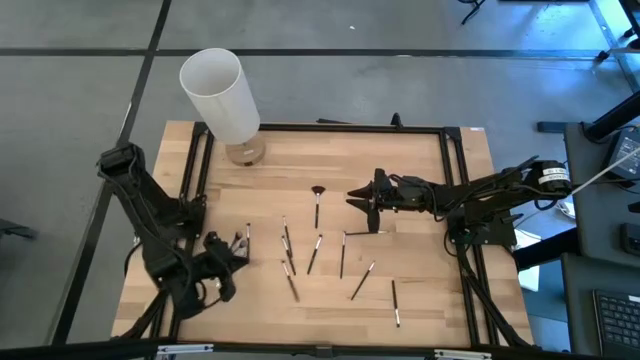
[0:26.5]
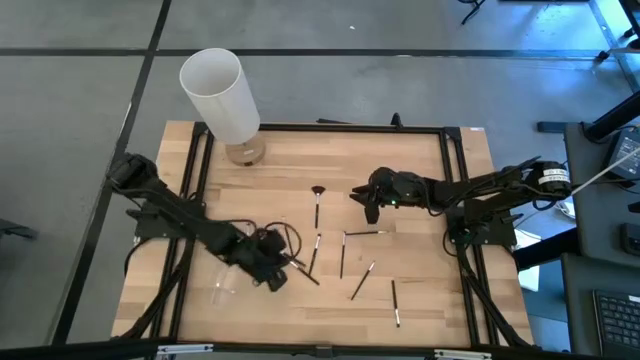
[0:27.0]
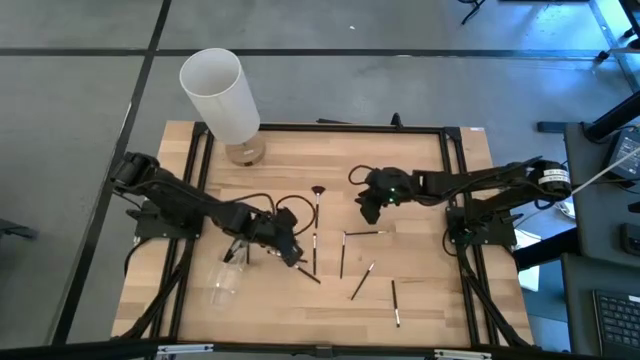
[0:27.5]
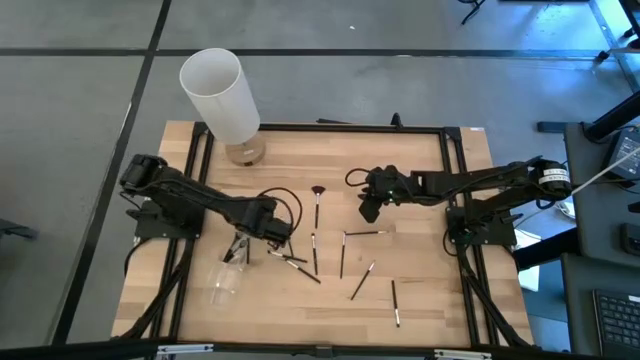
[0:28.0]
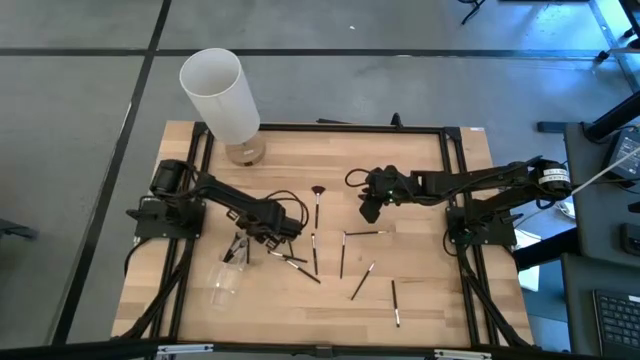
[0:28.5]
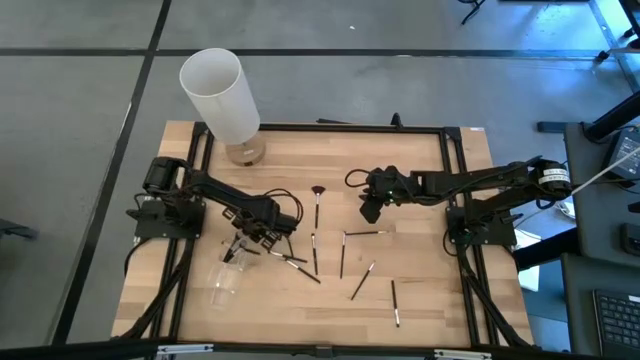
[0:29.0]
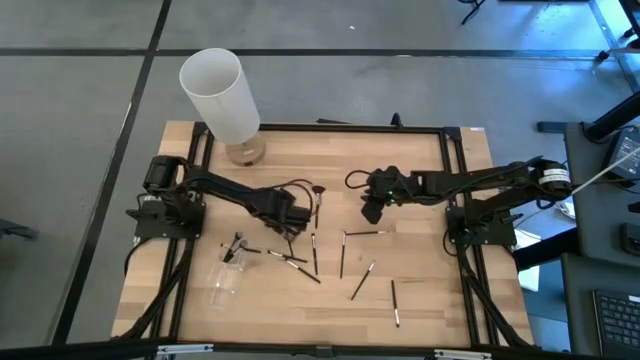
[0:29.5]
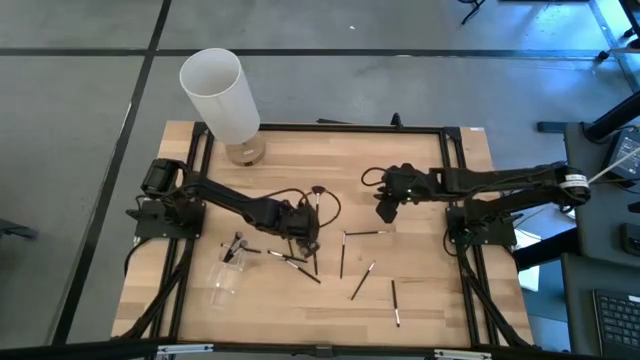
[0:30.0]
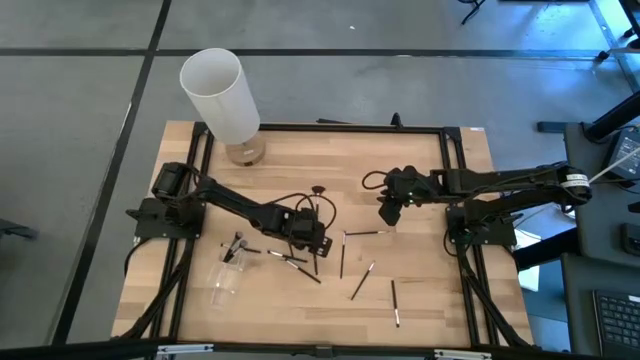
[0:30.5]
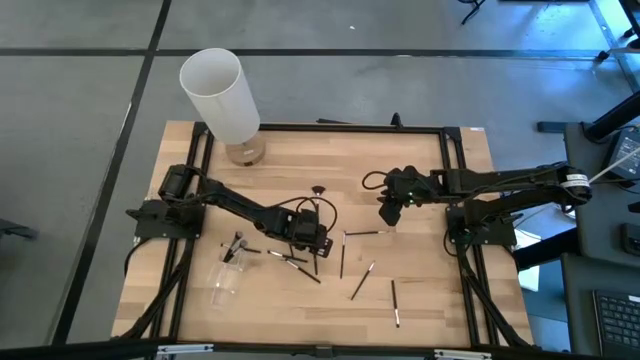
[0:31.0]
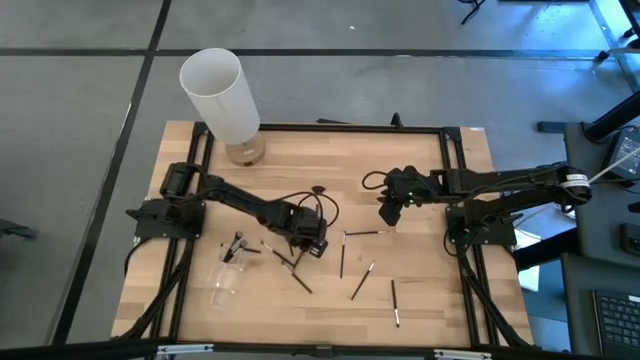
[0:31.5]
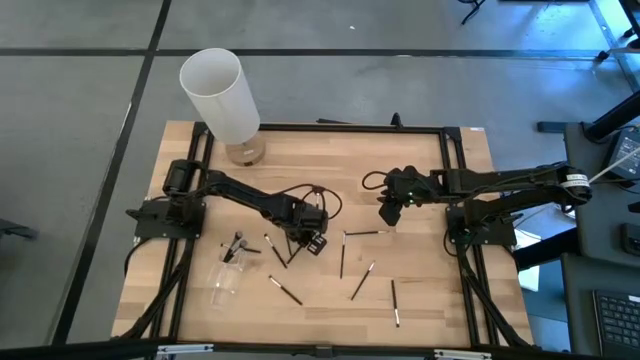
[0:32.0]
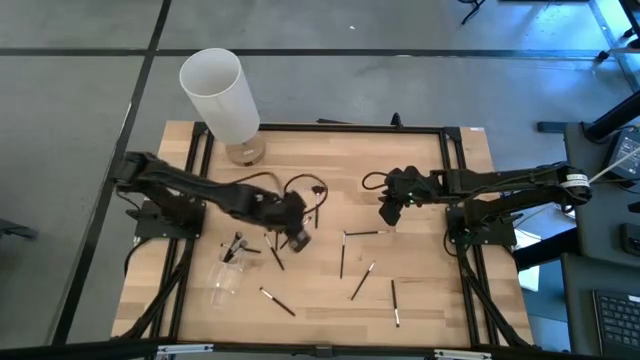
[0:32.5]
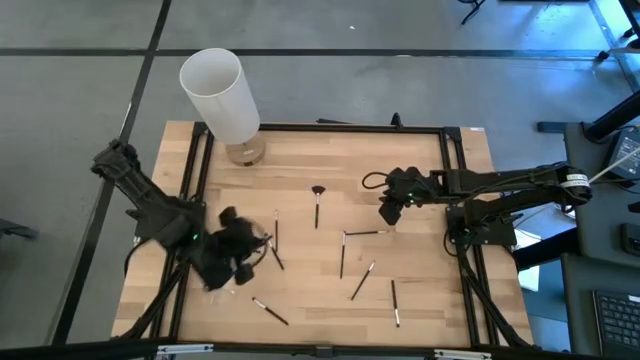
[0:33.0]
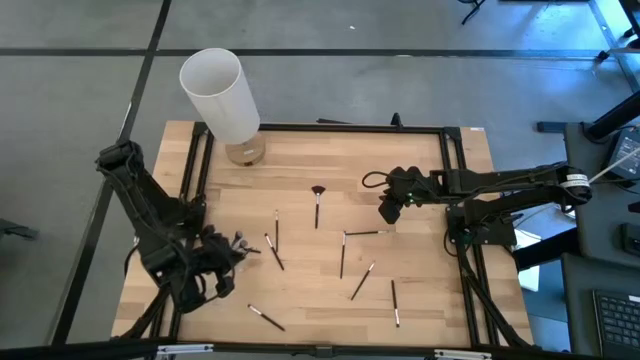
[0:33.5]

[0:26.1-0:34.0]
Task: Put items in baskets/containers
Put the black eyeshadow brush into the transparent organizer

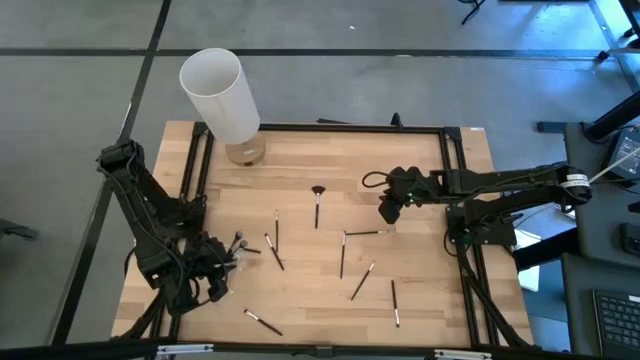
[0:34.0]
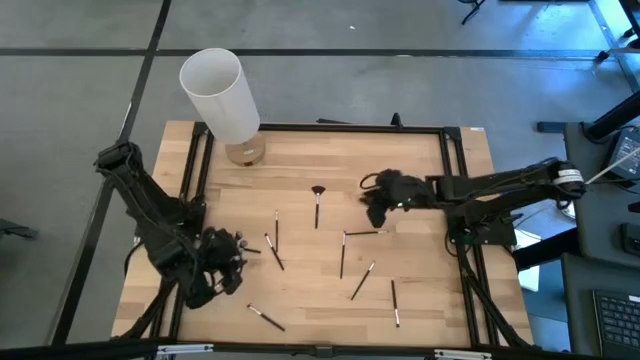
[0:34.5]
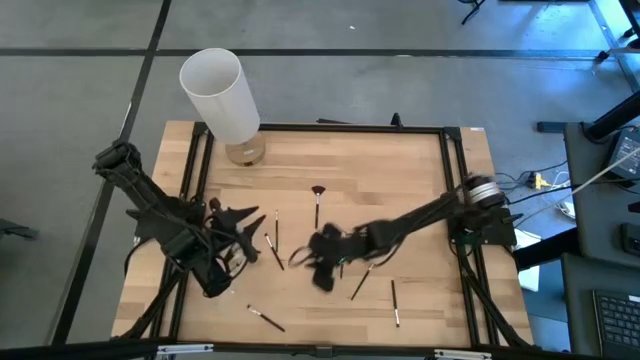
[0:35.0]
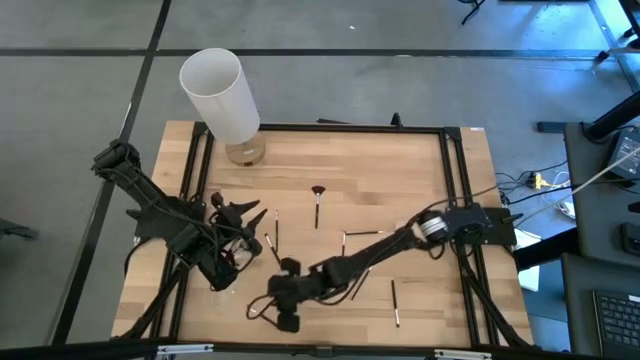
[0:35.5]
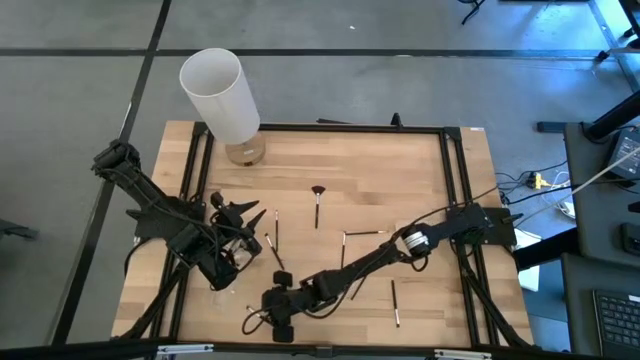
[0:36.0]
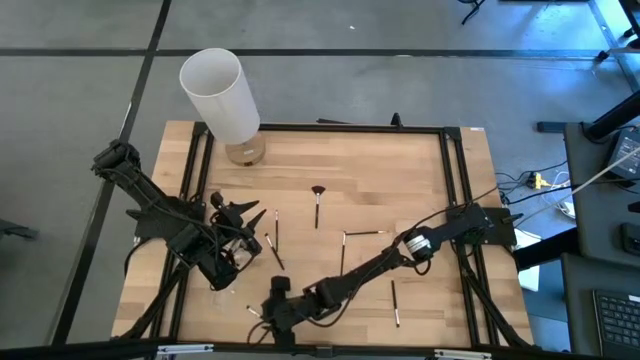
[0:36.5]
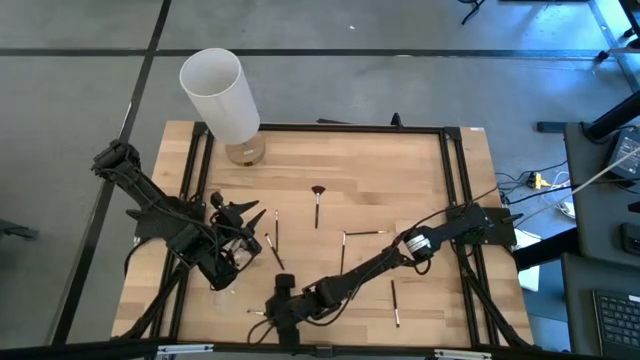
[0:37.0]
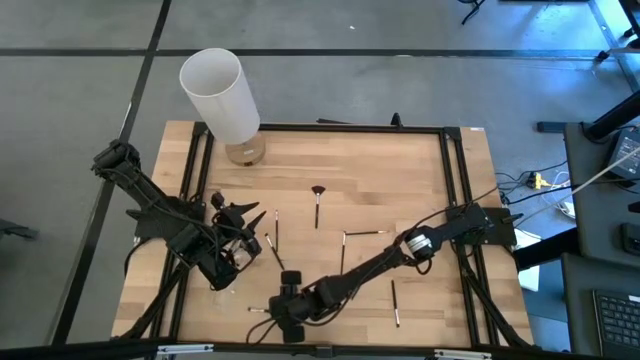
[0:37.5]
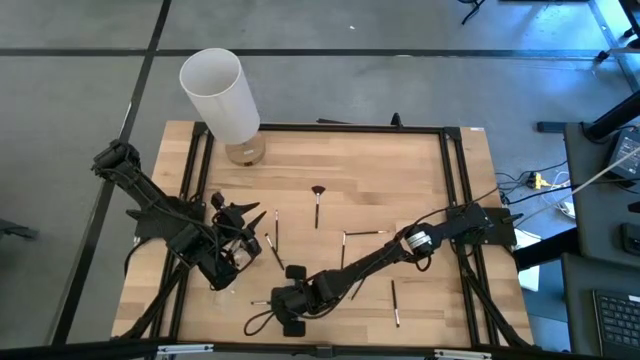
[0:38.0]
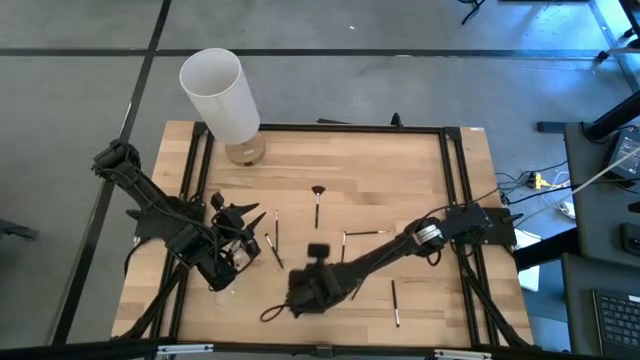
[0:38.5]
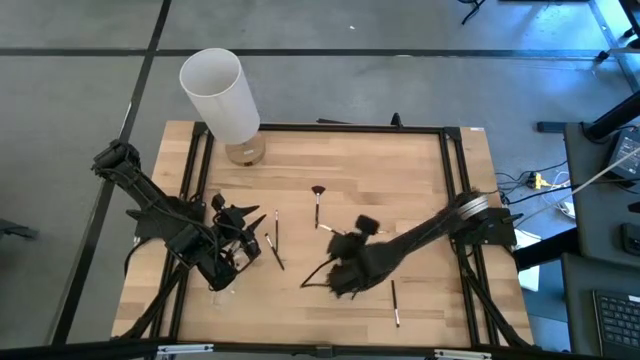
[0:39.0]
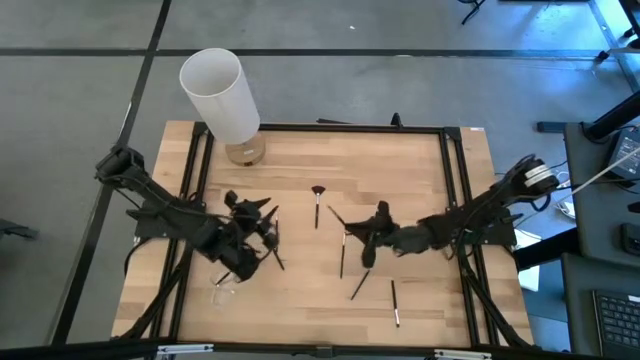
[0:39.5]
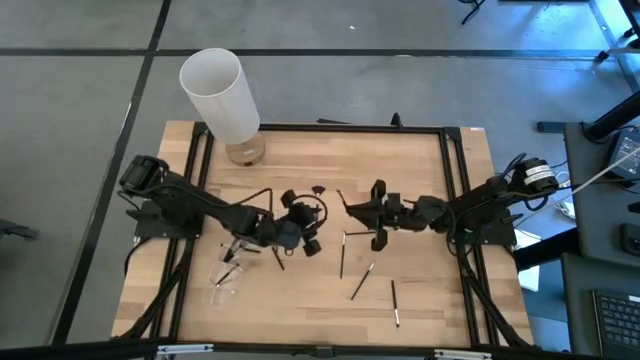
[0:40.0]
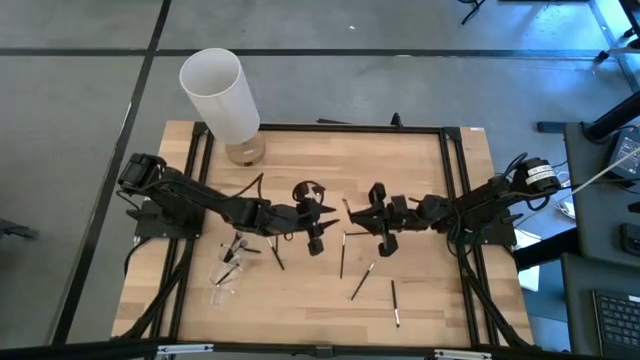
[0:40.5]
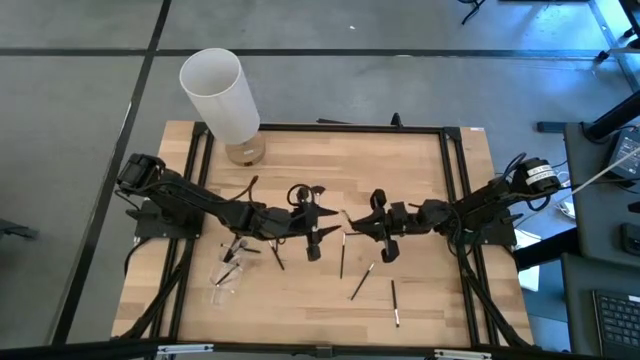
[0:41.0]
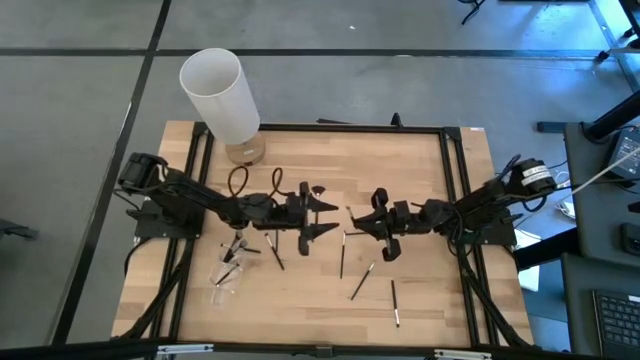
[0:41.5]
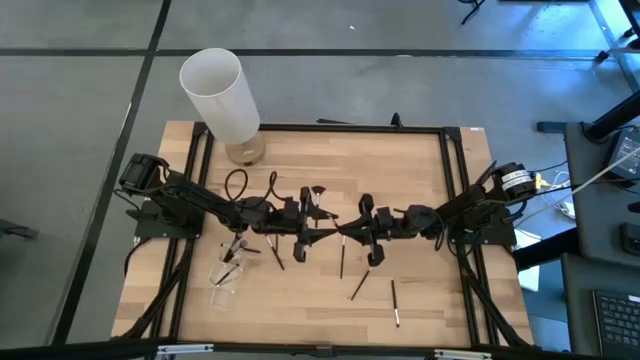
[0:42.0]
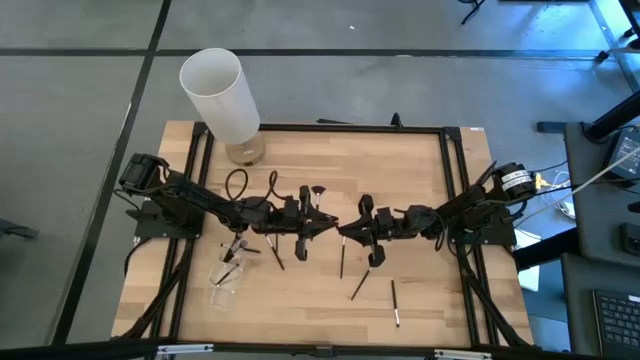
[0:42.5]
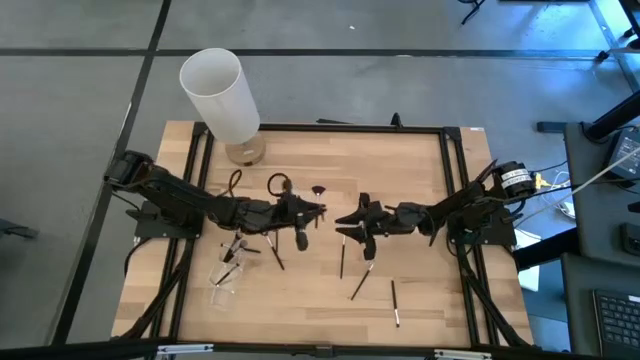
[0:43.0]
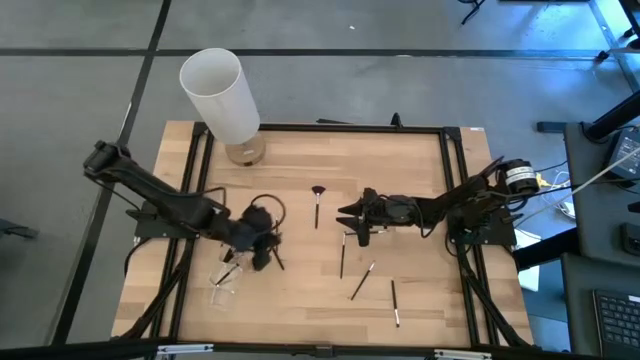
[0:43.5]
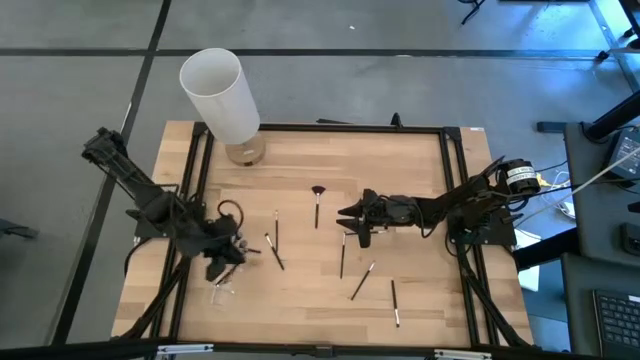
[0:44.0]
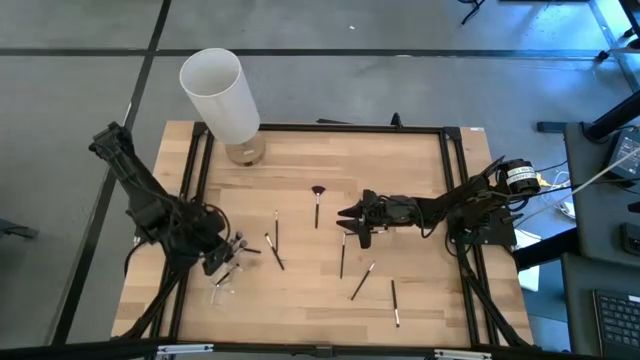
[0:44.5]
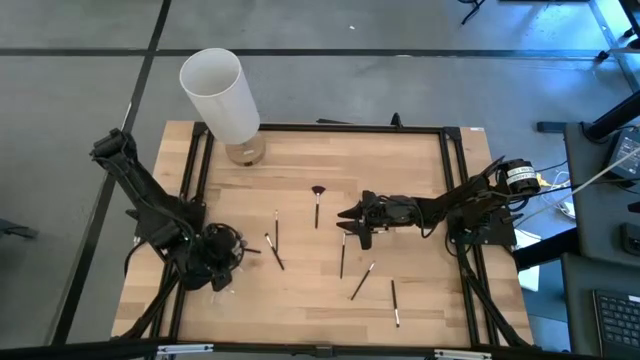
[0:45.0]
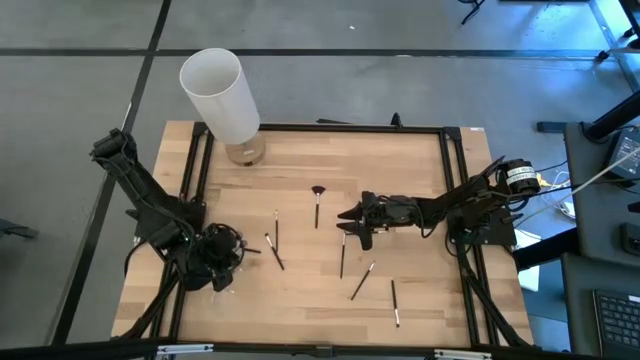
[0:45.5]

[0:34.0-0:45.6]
Put the black eyeshadow brush into the transparent organizer

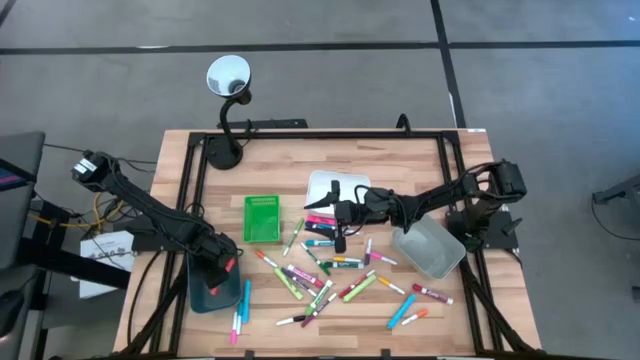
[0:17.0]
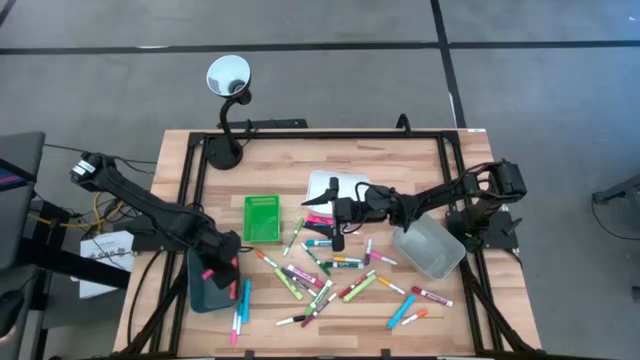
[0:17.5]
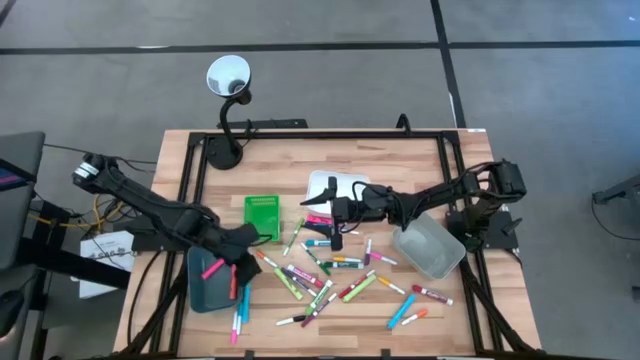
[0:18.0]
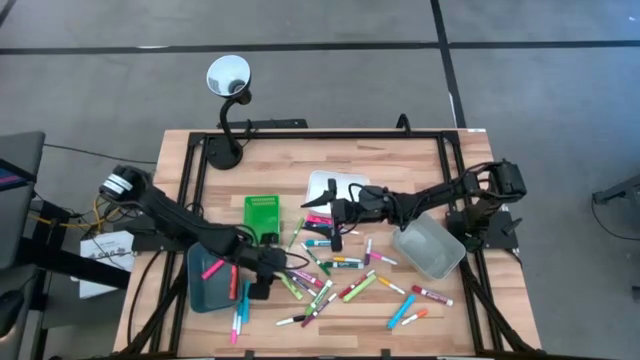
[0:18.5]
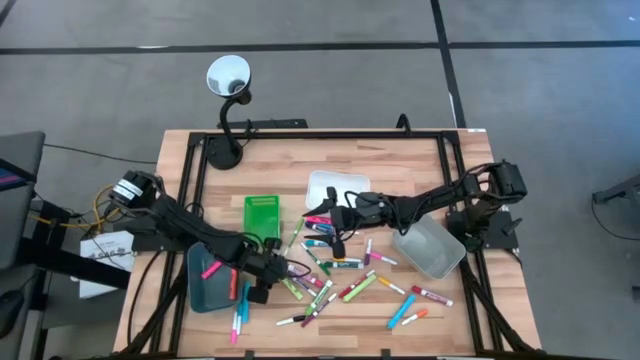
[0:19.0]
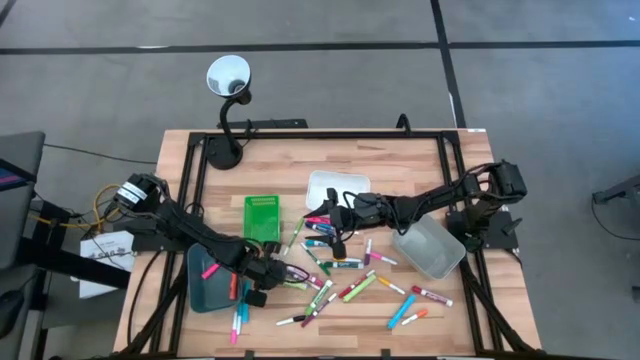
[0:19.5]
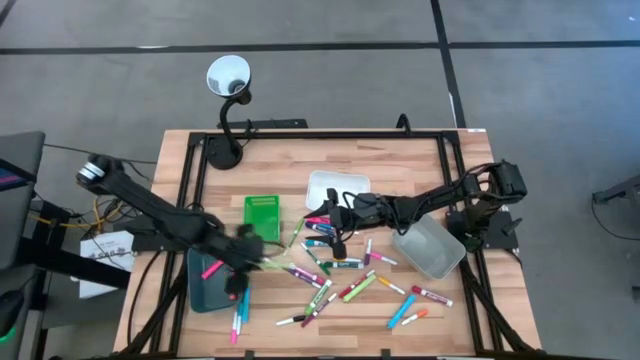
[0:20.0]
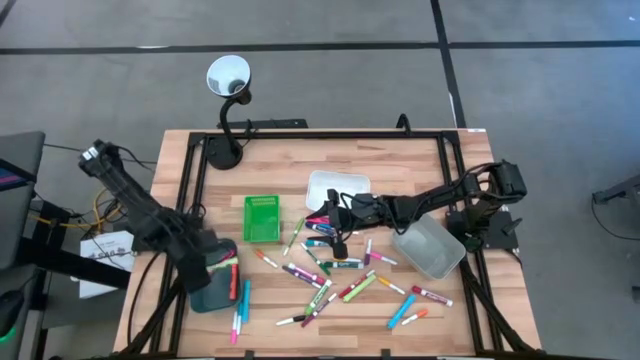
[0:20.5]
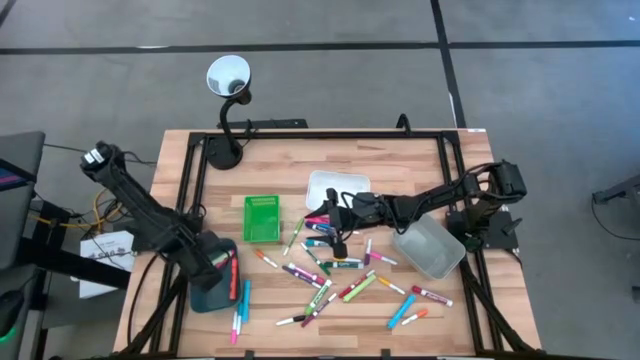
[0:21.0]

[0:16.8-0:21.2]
Task: Pick & Place Markers
Put the big light green highlighter pen into the blue bin
